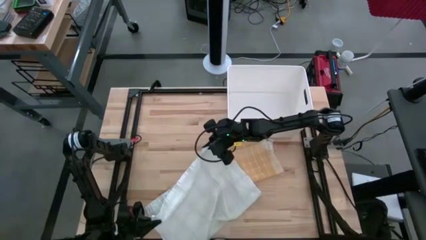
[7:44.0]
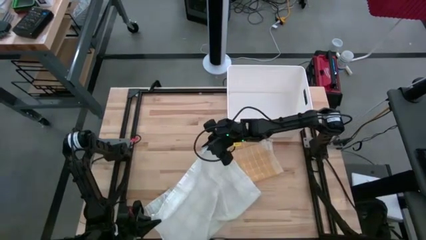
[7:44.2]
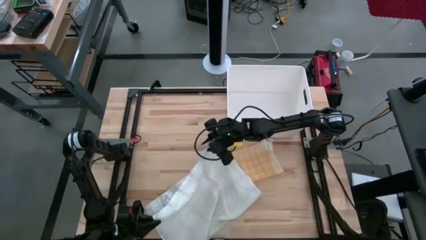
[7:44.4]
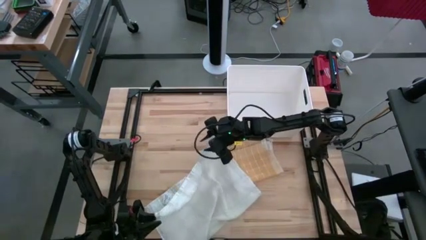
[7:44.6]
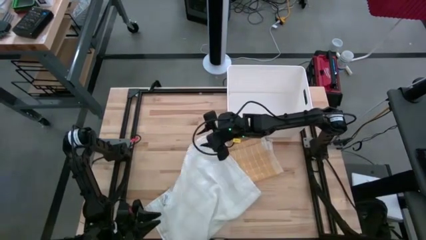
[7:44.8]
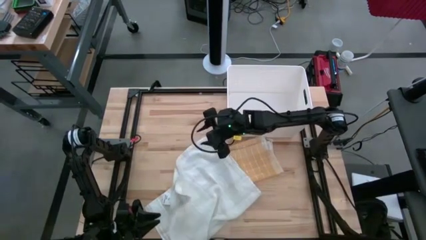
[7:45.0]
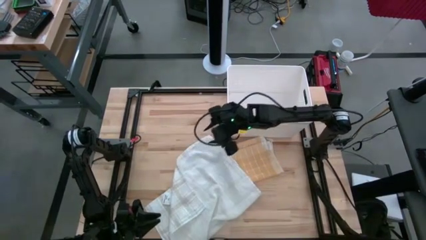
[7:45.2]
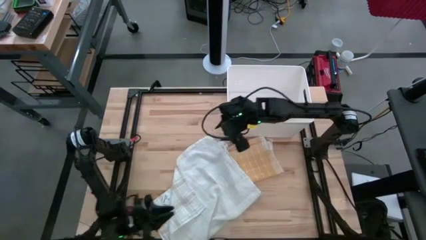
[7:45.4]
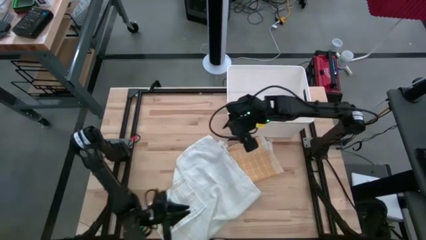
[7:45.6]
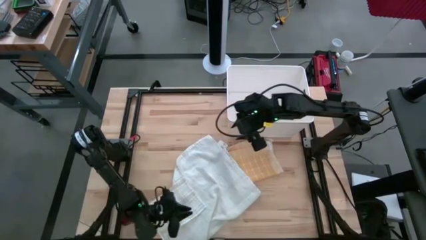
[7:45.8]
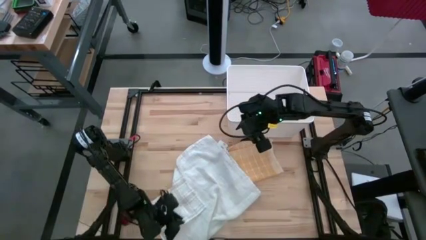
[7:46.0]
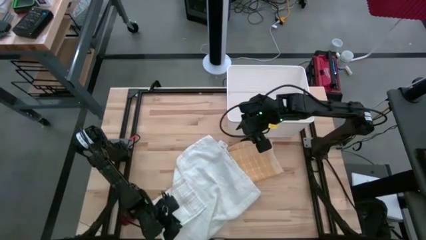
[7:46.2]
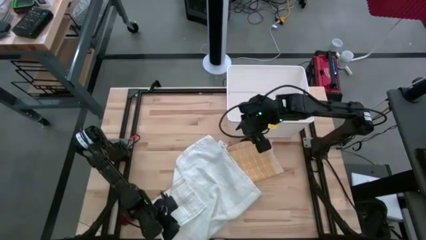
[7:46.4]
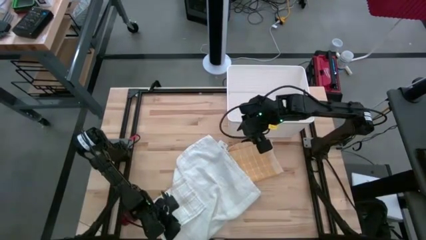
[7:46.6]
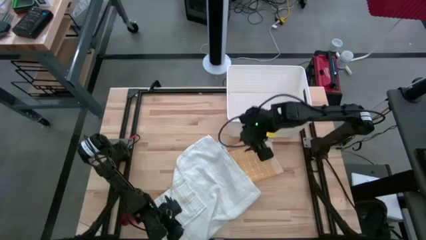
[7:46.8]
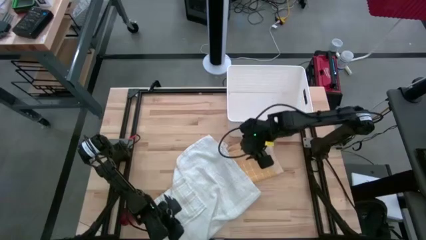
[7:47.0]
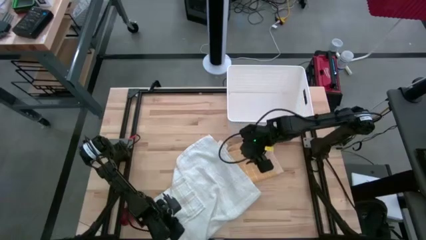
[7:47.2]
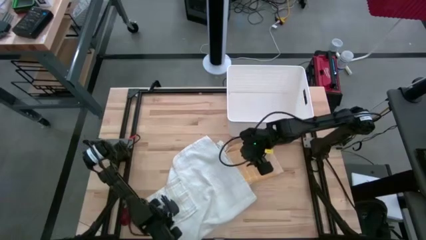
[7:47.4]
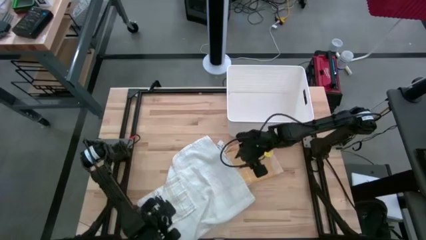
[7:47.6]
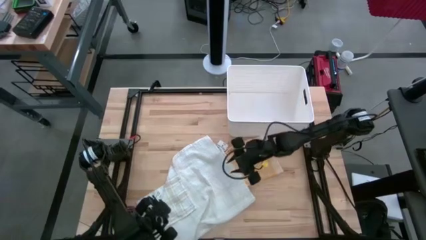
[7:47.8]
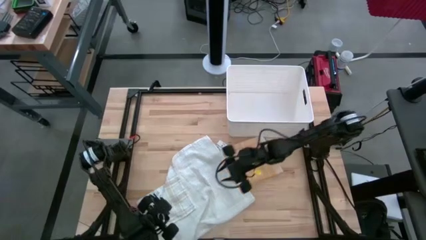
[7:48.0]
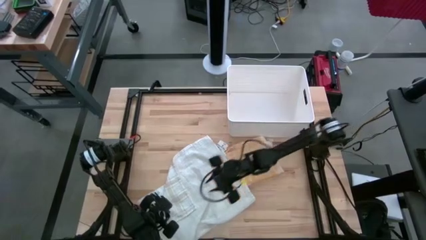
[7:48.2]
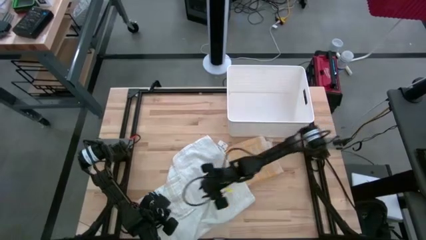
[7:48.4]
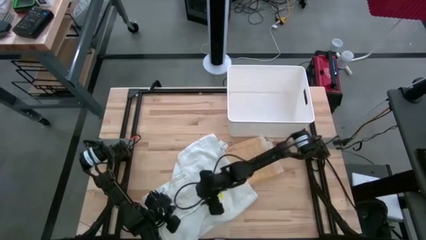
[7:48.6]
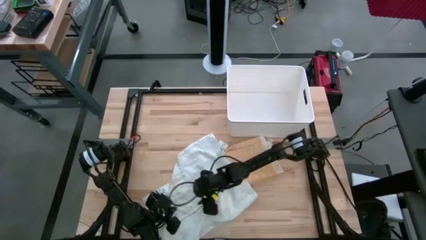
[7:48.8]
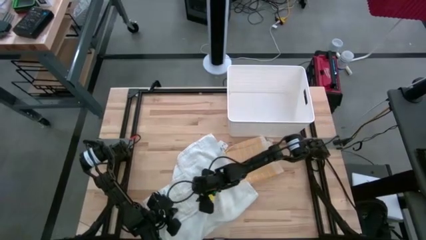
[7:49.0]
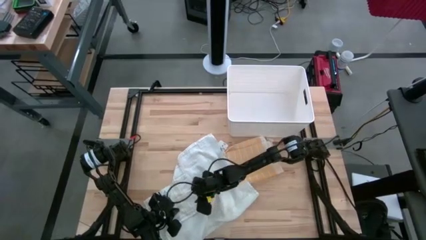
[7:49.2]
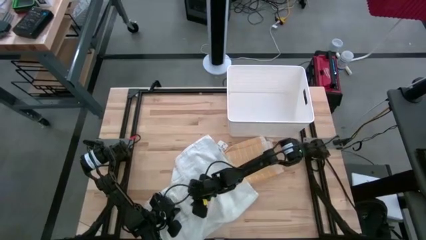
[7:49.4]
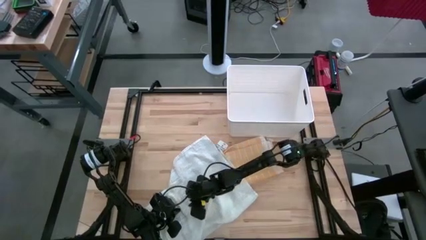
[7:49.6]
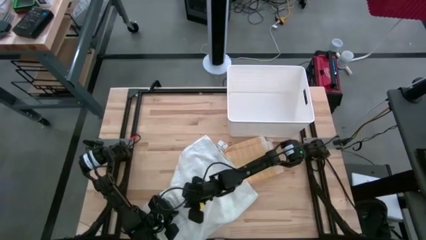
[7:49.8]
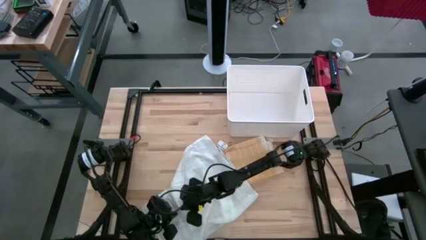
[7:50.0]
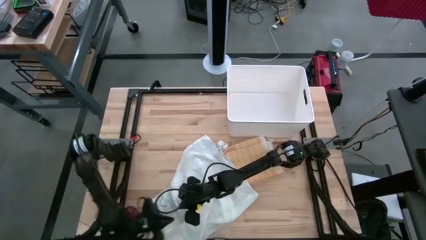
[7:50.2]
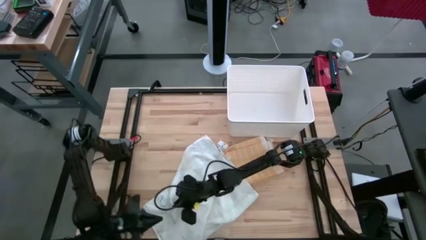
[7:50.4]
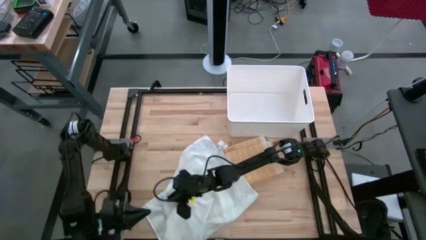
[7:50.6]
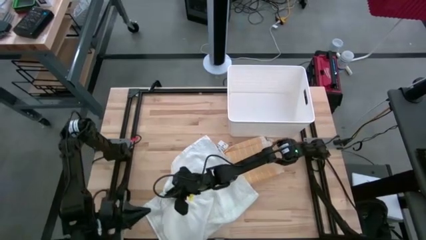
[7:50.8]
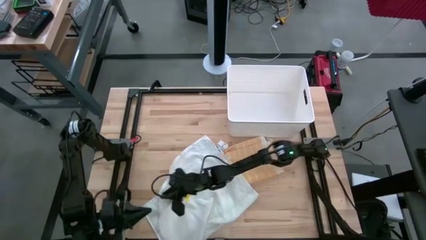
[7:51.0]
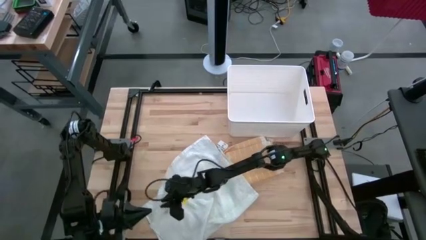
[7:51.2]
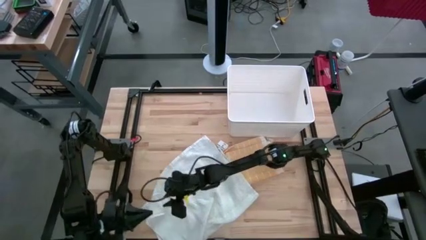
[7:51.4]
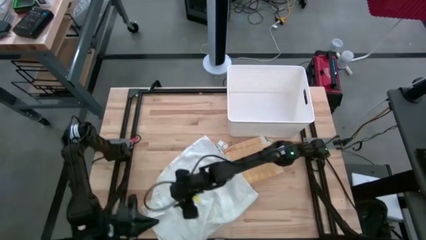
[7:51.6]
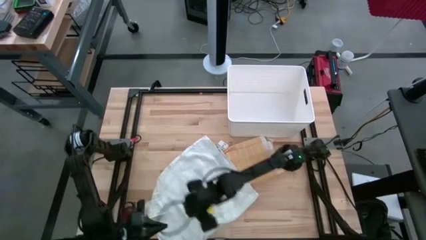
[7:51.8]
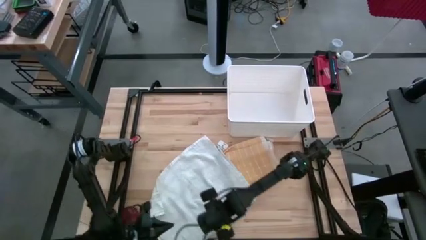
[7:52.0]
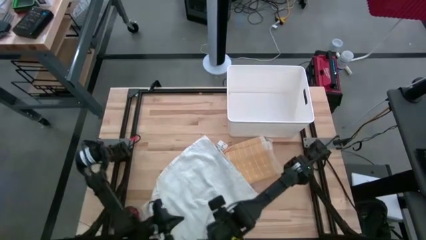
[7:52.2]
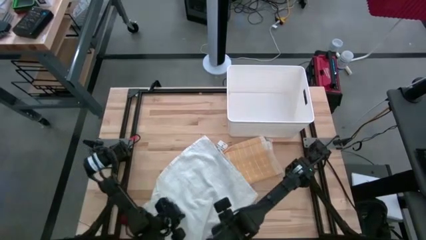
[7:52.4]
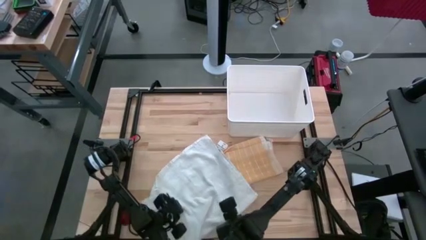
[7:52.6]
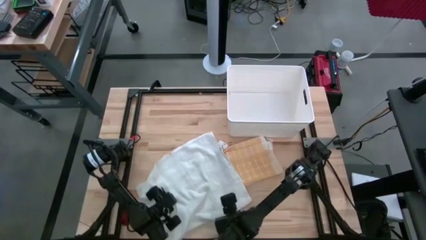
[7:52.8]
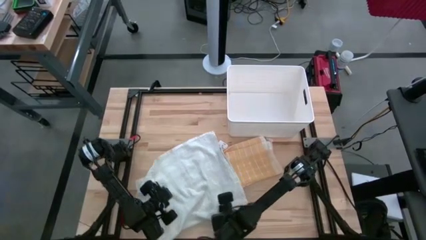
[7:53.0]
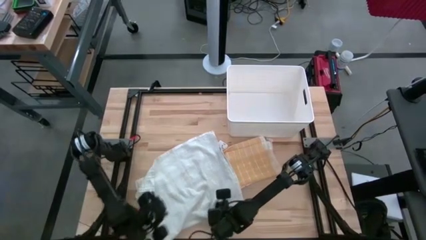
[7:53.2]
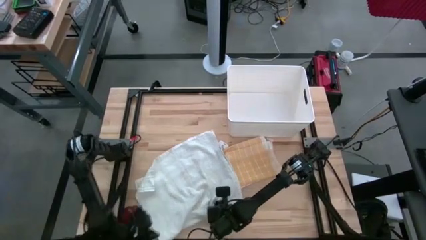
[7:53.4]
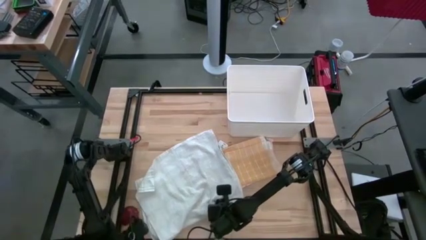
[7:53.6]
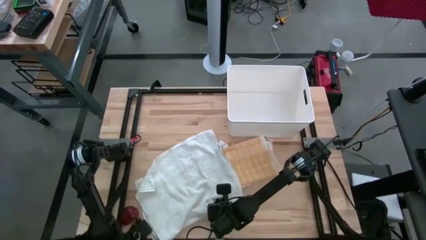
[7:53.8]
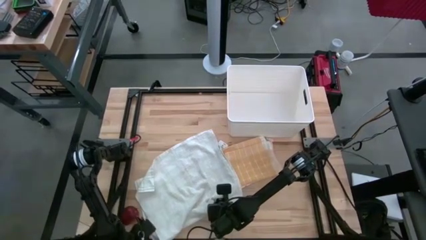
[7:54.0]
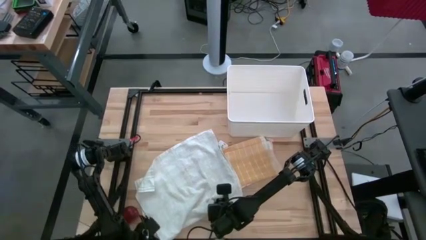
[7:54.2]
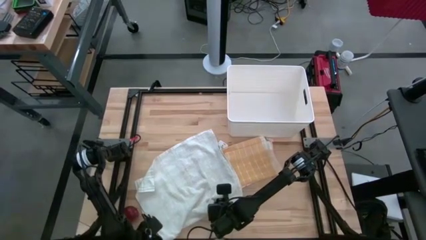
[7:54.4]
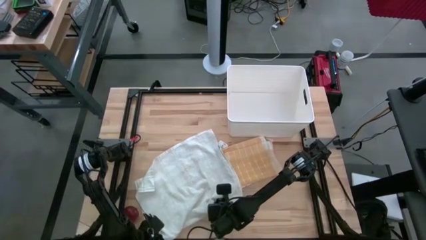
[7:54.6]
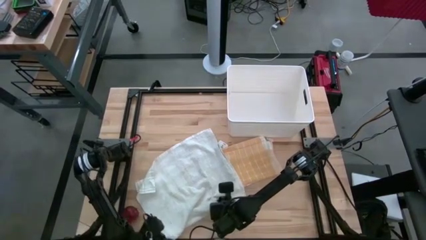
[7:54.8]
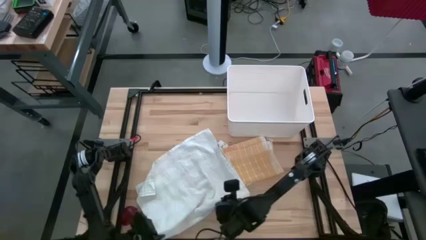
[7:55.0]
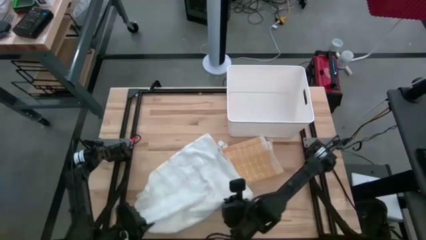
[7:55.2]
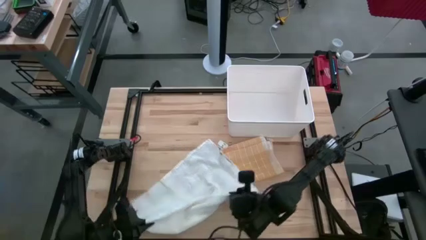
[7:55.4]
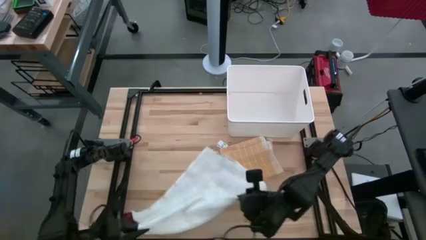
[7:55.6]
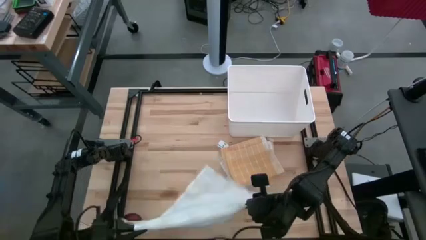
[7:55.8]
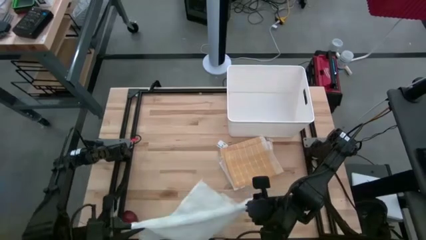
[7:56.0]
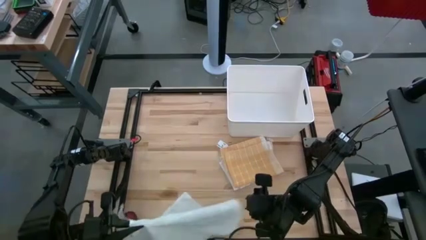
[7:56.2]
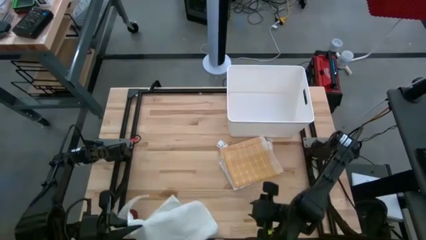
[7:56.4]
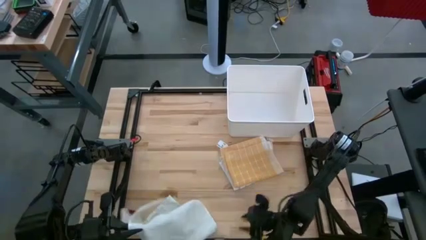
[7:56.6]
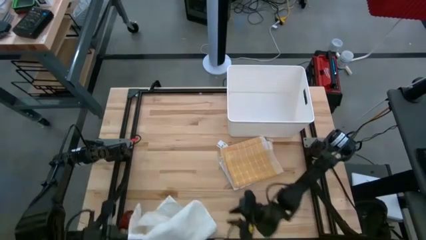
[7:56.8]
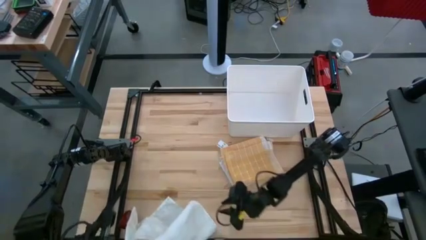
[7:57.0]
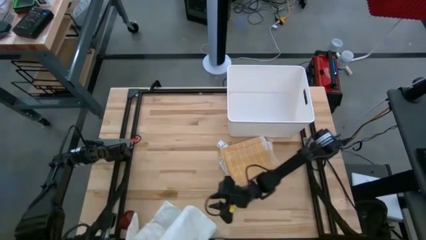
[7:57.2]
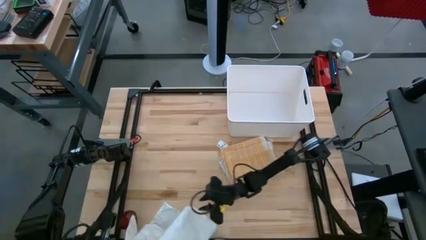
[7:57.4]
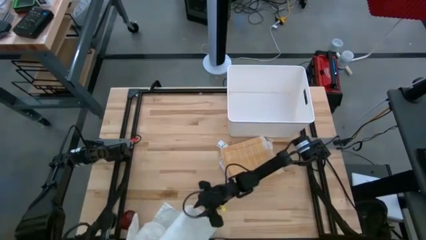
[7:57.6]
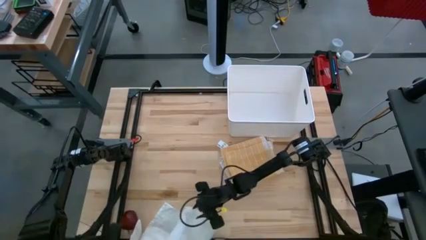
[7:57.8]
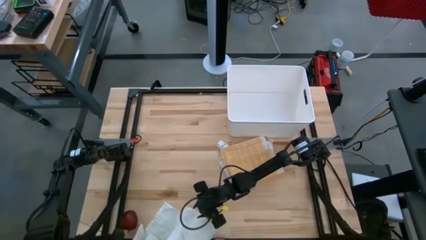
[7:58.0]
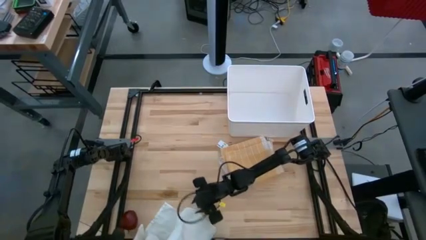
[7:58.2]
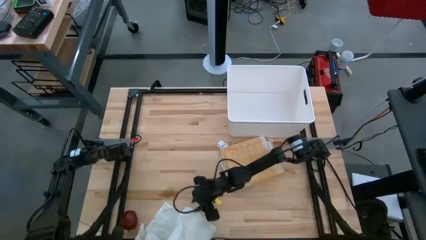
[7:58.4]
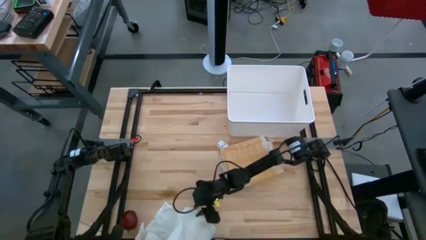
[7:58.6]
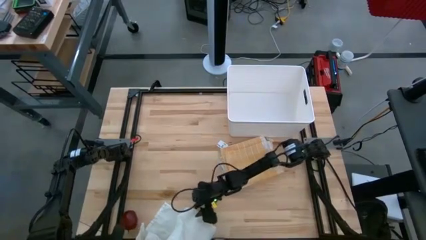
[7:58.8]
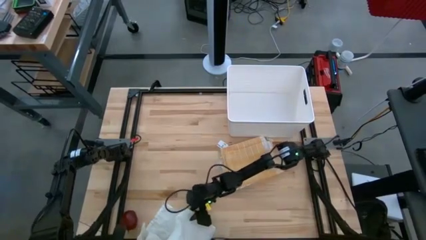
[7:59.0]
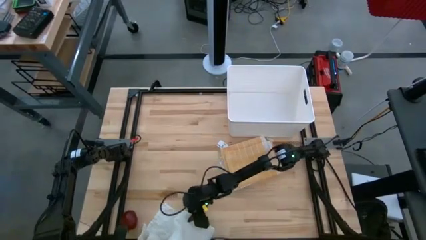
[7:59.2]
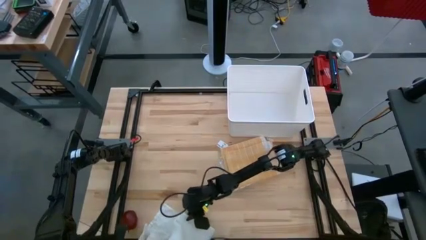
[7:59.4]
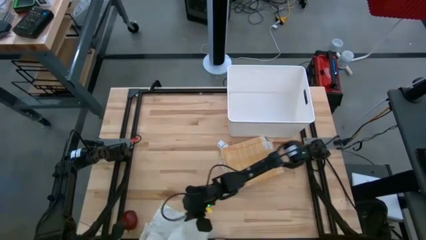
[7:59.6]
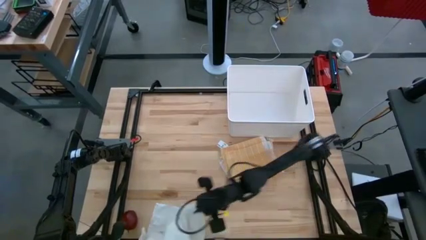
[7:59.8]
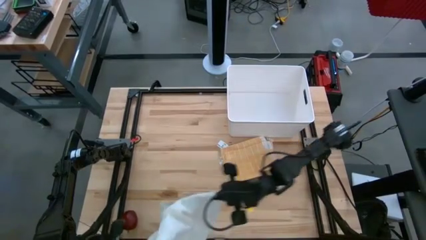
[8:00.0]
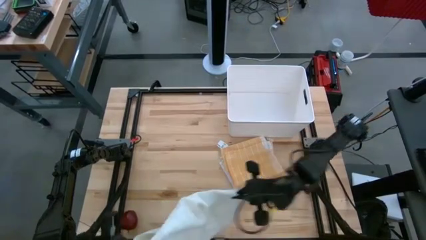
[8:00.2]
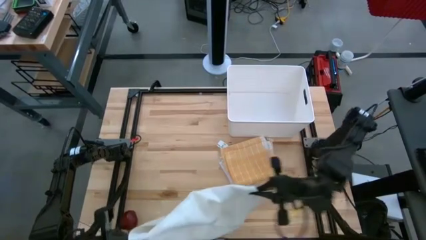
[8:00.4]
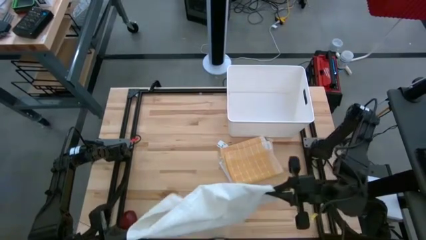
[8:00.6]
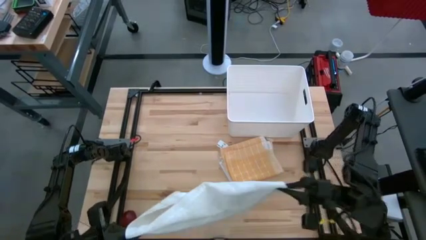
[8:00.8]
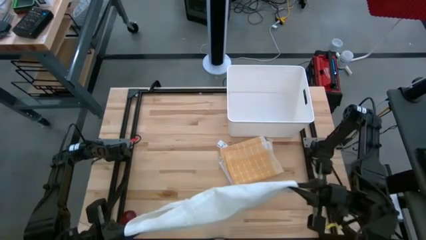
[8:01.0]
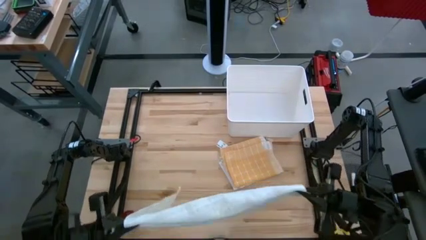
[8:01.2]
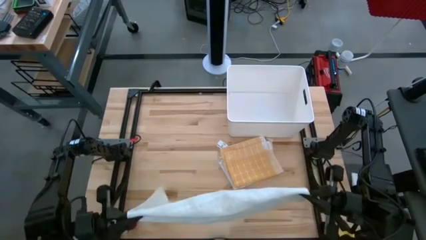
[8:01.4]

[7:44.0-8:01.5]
Task: Fold towel
Fold the white checkered towel
